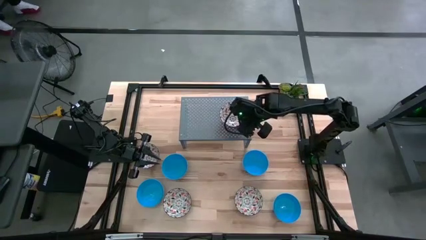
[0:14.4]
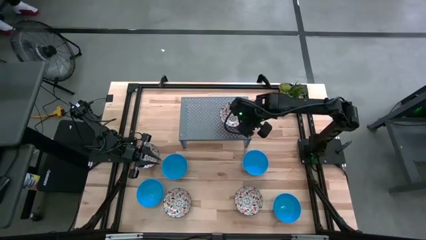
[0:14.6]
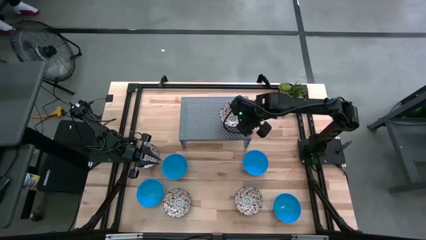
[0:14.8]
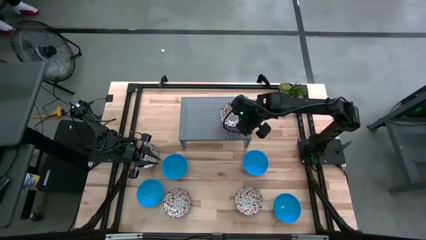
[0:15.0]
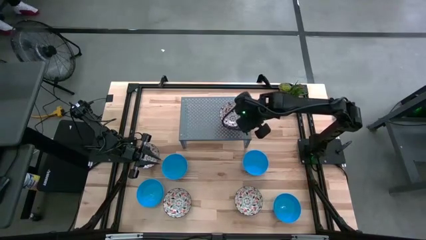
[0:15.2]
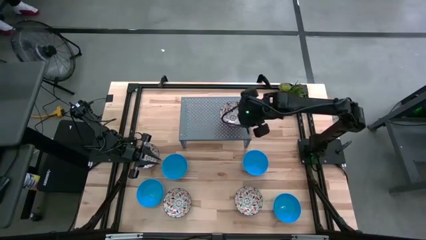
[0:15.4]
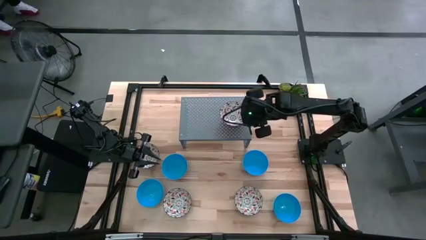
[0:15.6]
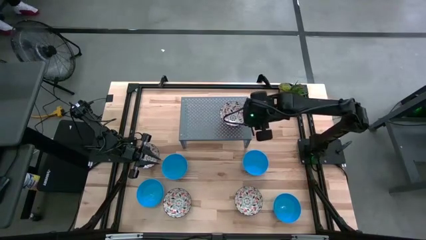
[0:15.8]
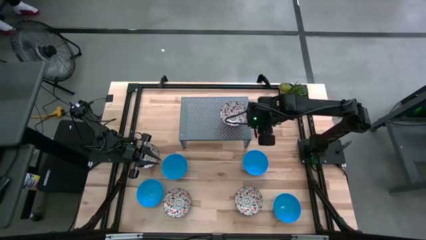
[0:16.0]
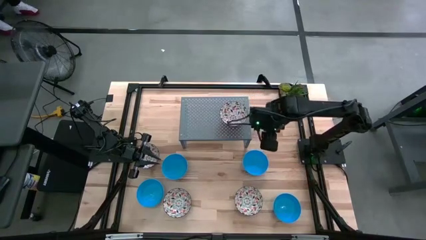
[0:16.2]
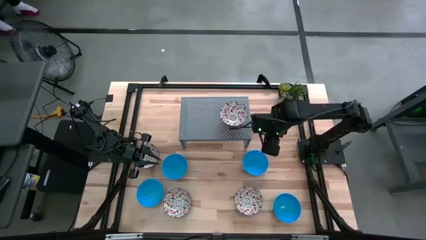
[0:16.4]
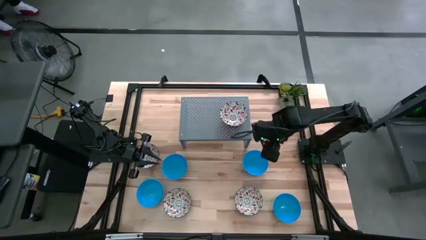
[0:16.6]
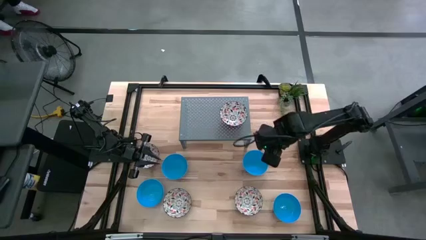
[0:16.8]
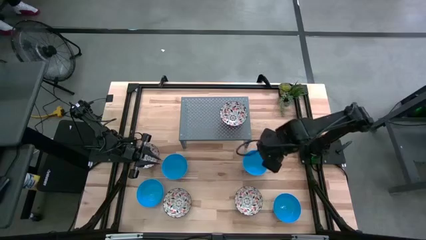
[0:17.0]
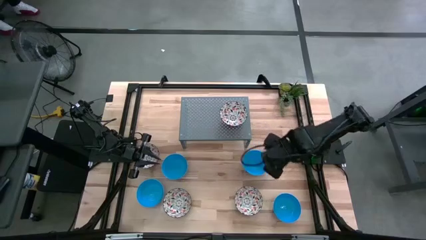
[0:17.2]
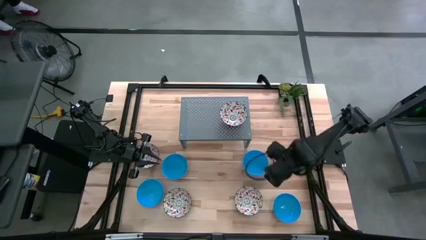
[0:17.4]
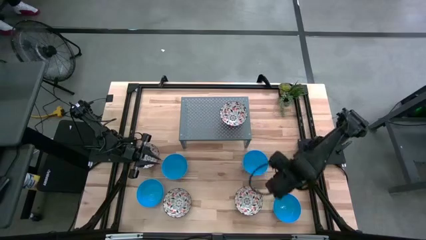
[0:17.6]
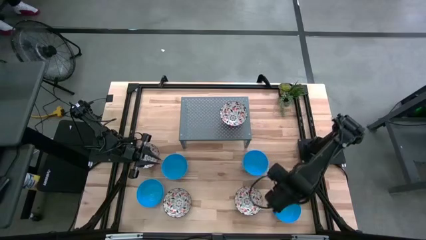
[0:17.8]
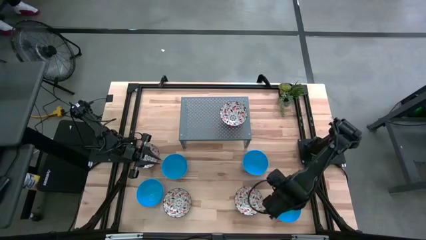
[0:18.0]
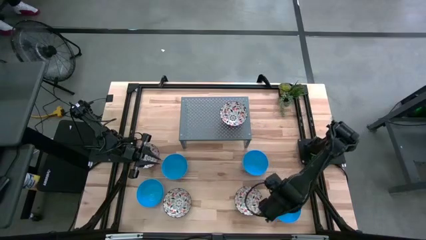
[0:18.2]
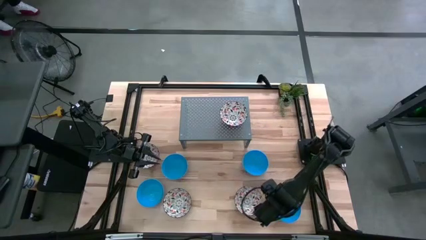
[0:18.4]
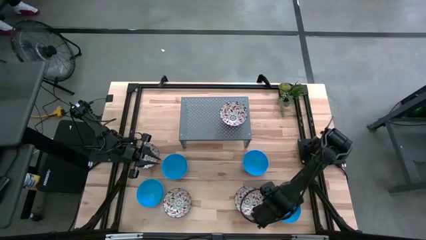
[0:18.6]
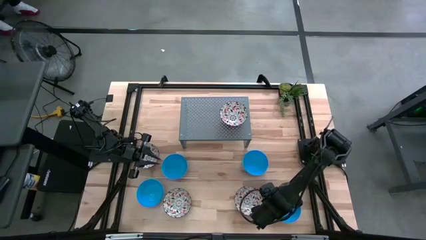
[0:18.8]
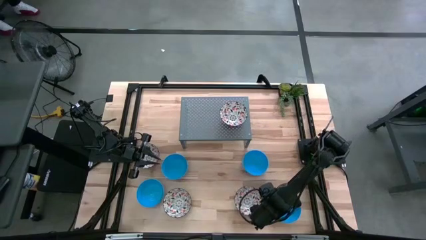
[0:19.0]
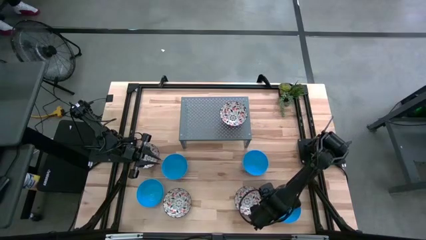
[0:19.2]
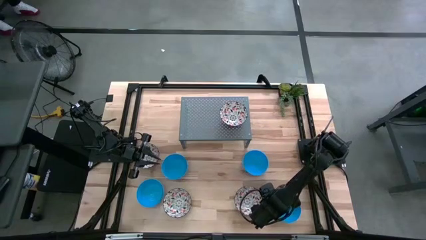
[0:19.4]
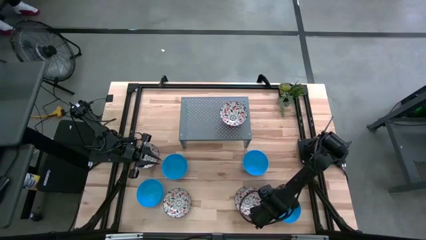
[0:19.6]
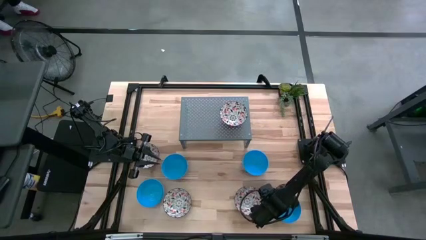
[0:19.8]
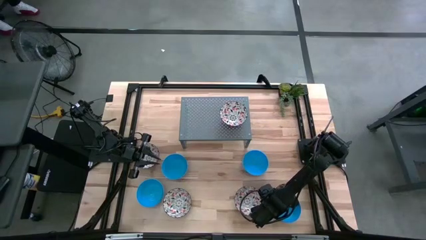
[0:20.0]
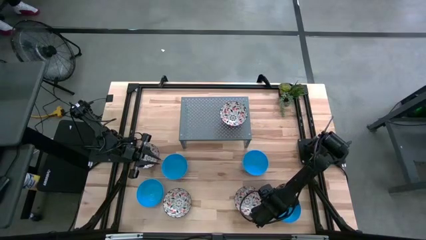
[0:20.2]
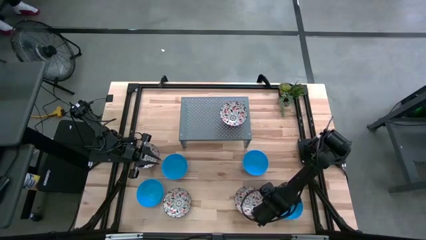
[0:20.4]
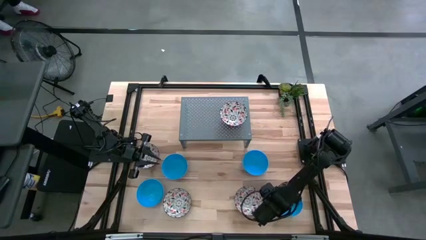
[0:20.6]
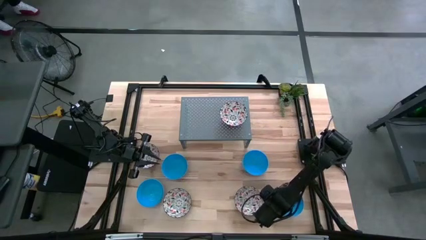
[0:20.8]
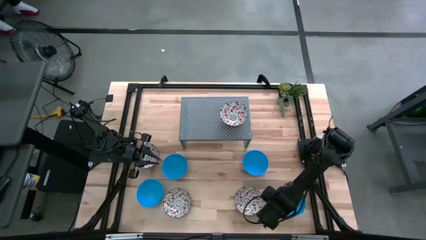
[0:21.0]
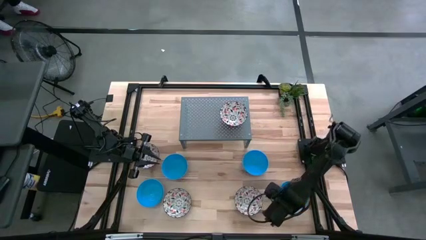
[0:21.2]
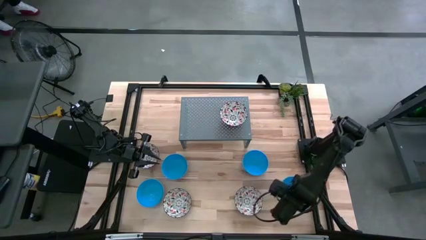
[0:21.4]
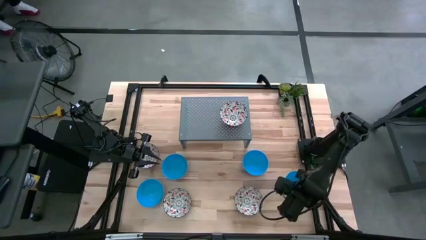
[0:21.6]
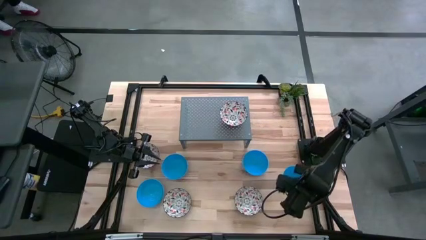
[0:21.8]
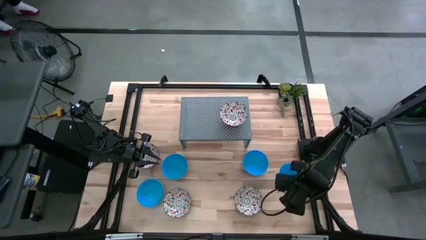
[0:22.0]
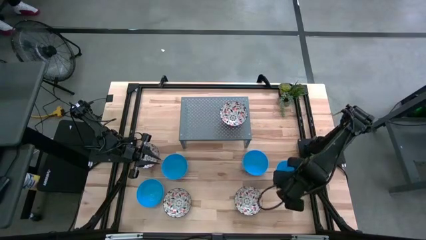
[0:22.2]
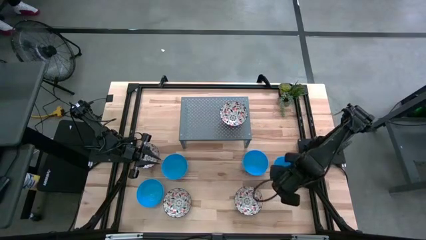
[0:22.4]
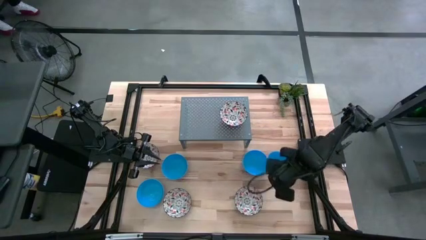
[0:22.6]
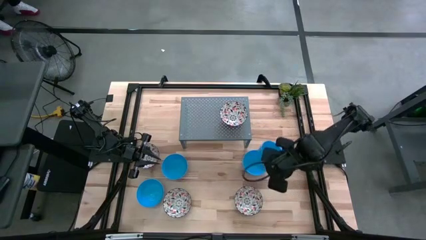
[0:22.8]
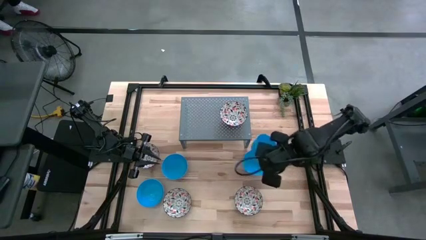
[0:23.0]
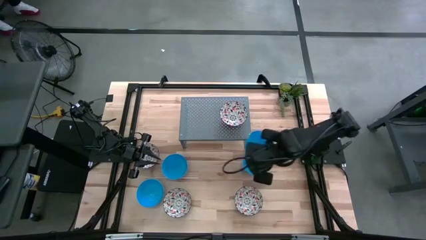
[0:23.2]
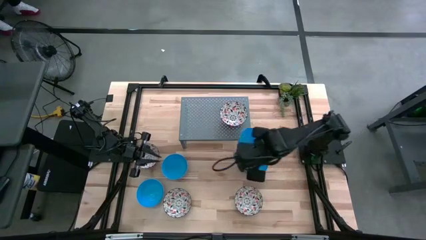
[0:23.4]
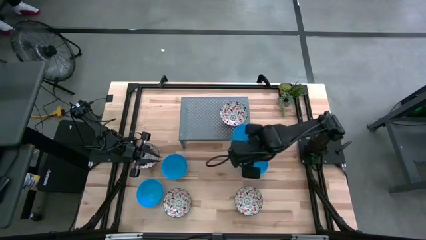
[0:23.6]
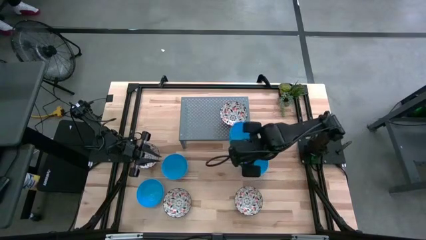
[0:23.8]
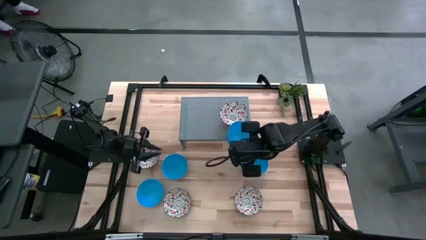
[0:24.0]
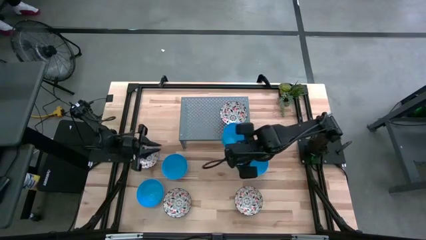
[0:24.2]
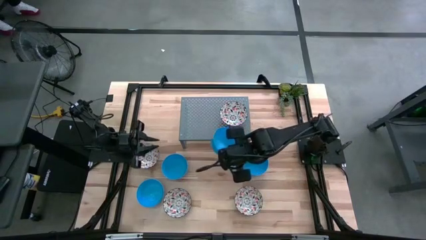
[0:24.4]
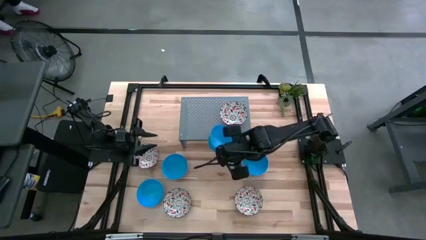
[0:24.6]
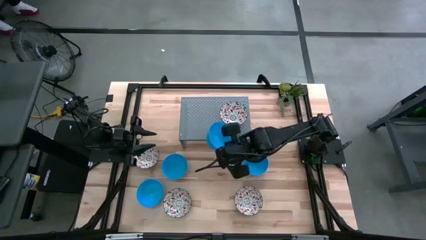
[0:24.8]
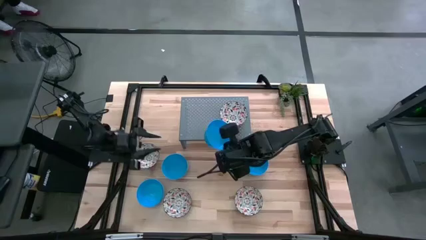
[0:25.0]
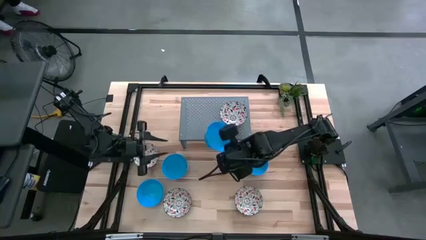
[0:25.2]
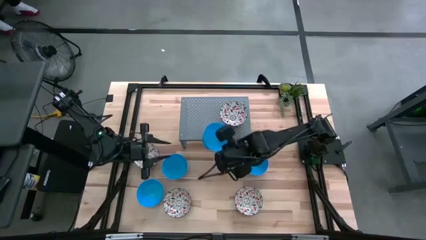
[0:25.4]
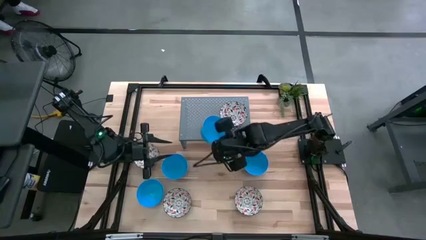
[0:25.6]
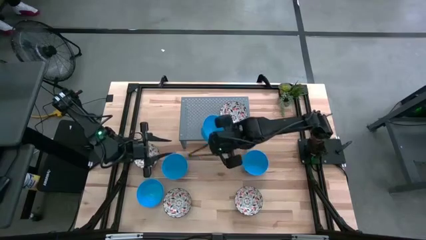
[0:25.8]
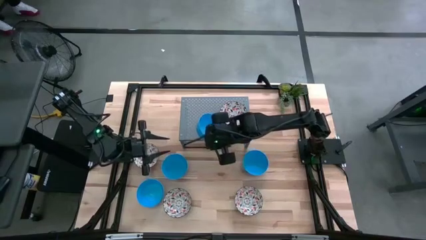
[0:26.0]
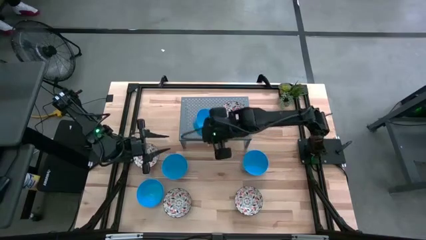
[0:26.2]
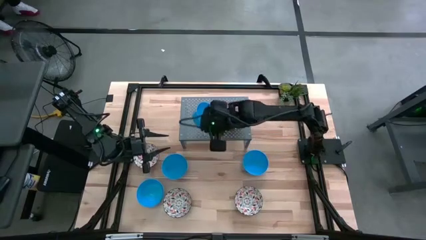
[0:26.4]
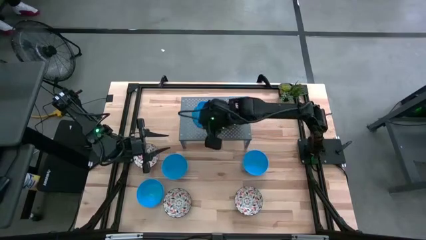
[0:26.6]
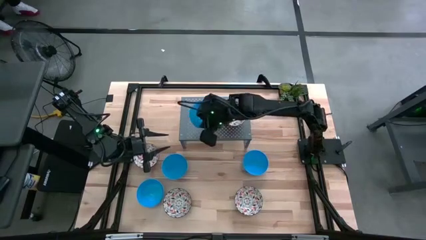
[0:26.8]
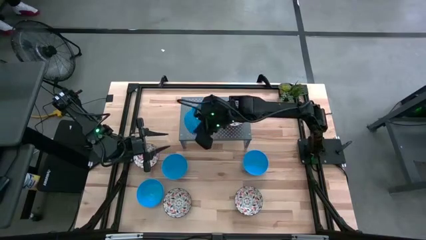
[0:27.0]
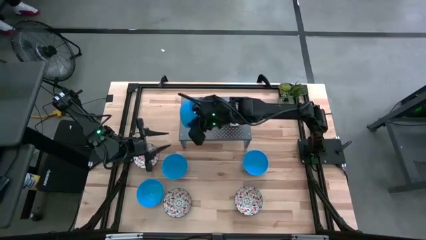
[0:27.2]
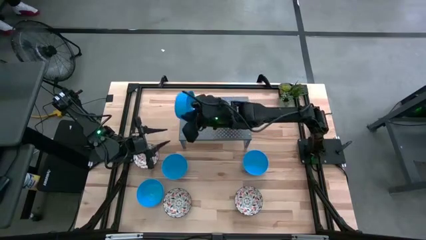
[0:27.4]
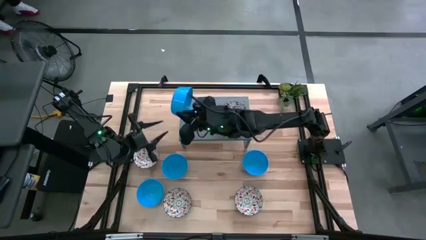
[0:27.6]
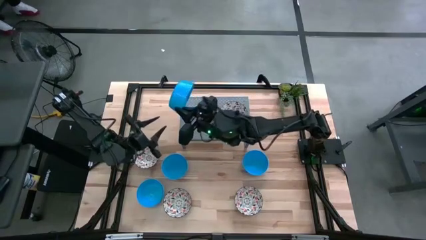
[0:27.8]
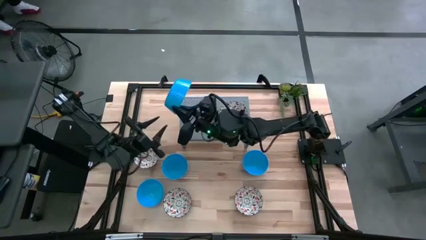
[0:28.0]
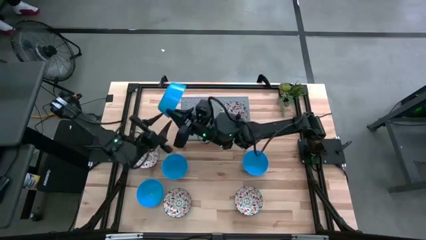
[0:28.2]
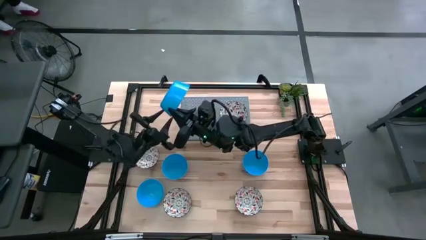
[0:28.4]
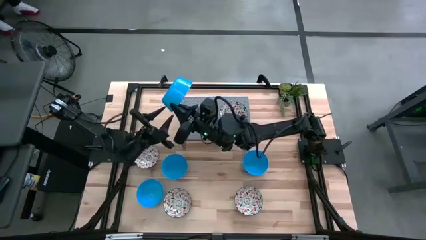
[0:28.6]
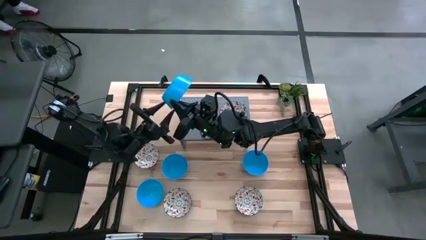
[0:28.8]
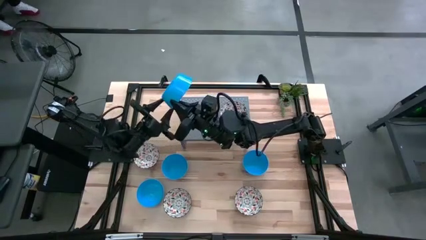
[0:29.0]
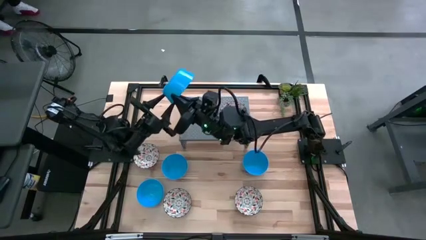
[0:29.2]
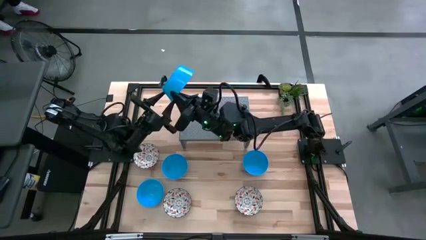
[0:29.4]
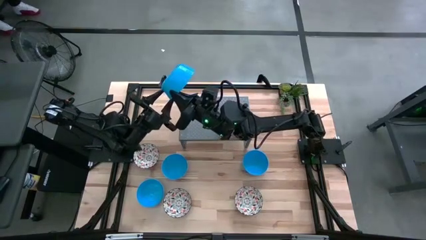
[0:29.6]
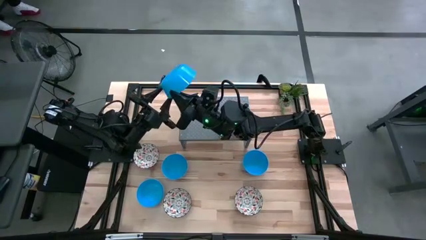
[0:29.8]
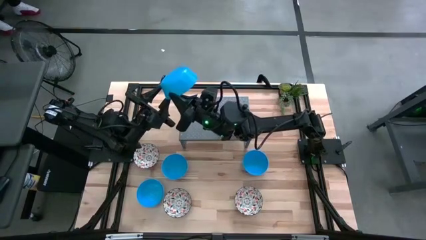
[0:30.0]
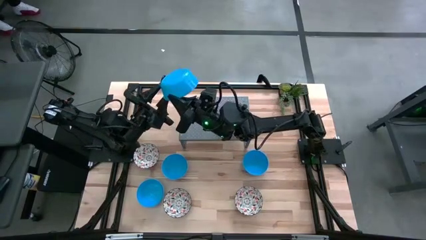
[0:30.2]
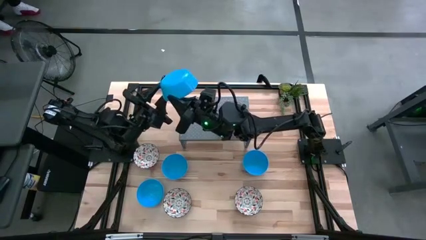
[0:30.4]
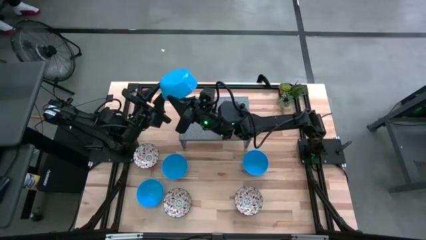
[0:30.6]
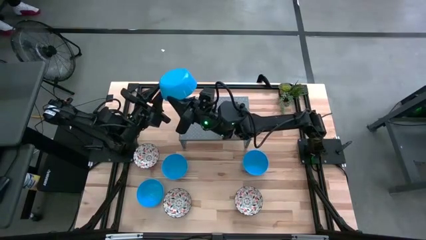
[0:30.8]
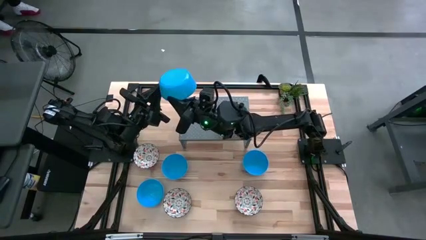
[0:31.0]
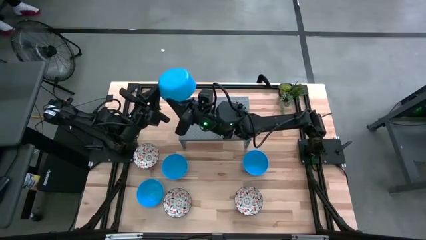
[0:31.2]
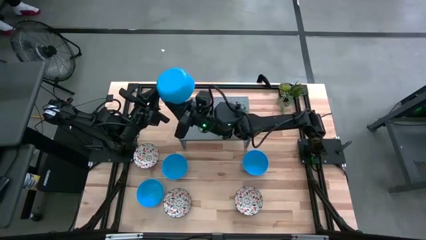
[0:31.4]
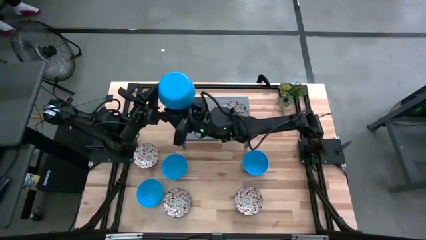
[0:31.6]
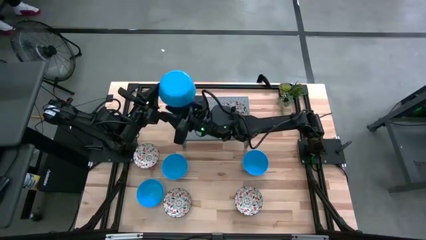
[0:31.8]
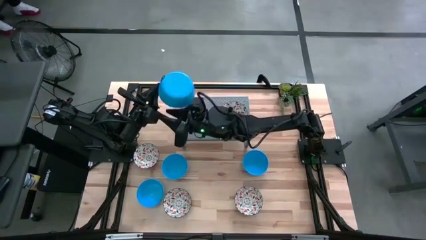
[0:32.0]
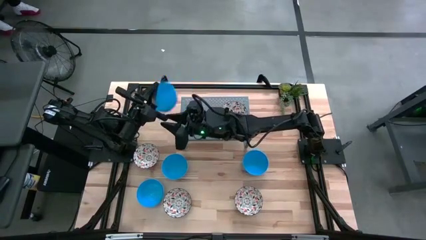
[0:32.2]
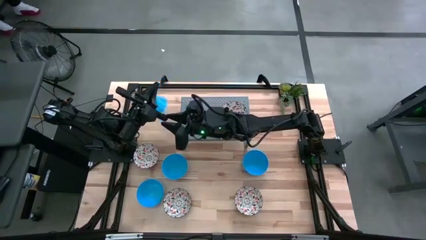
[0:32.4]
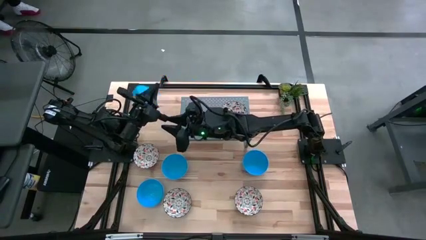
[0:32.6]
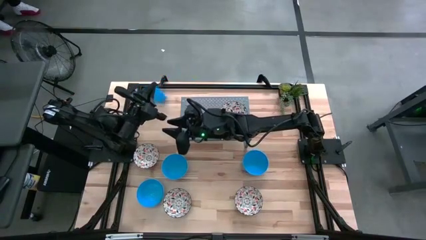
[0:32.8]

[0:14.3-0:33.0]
Task: Pick & Place Mini bowls
Put the blue bowl on the shelf
